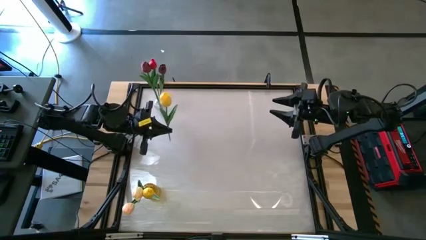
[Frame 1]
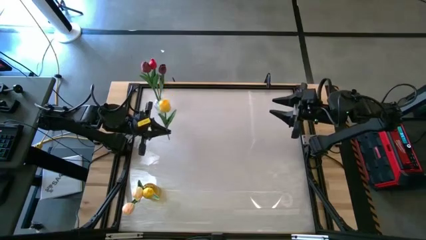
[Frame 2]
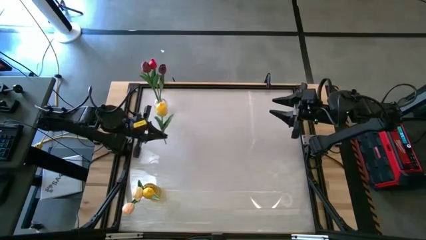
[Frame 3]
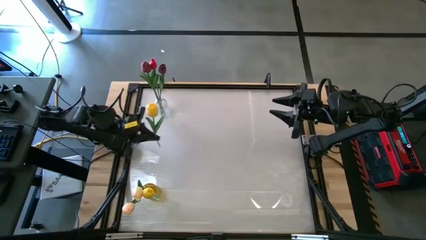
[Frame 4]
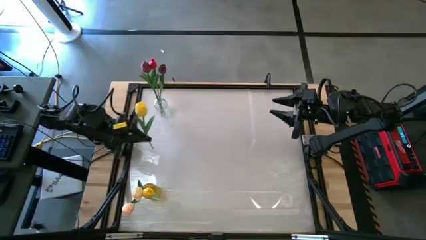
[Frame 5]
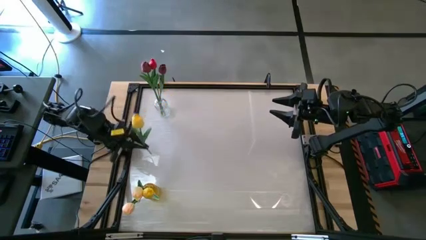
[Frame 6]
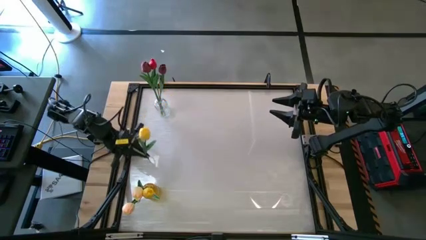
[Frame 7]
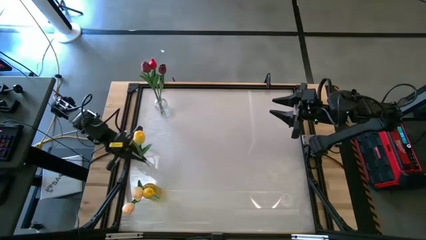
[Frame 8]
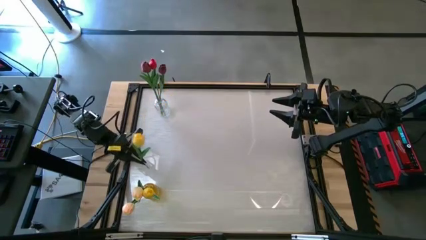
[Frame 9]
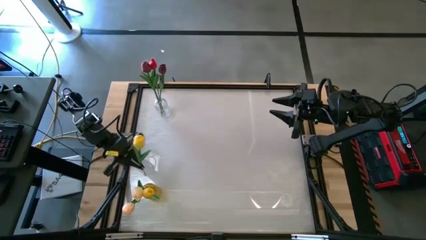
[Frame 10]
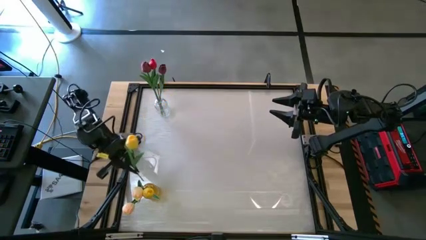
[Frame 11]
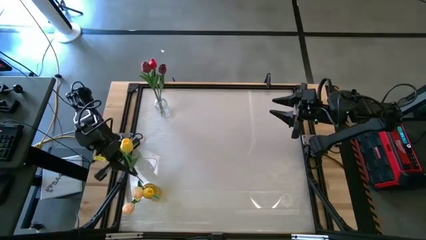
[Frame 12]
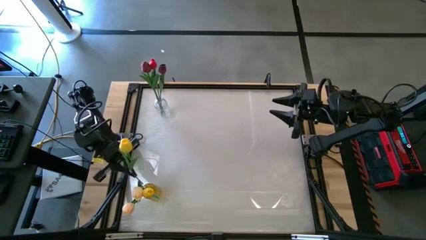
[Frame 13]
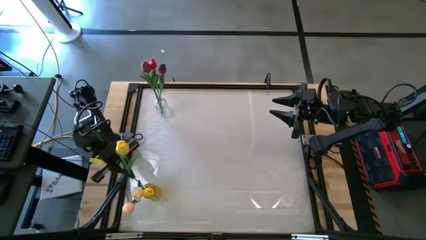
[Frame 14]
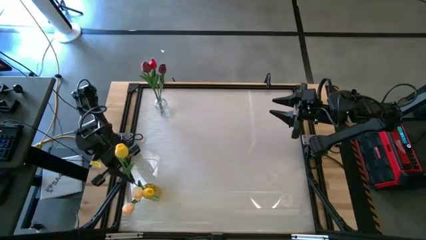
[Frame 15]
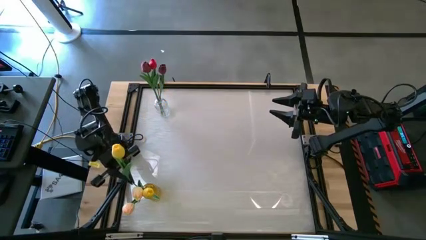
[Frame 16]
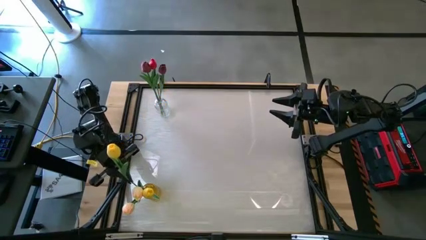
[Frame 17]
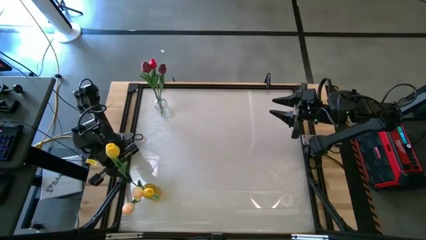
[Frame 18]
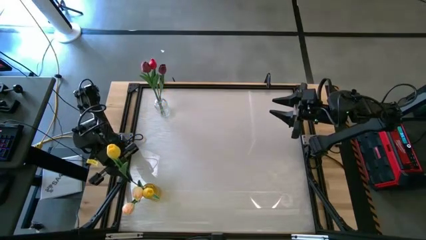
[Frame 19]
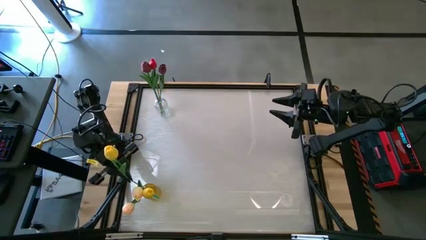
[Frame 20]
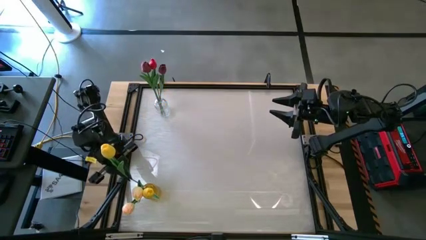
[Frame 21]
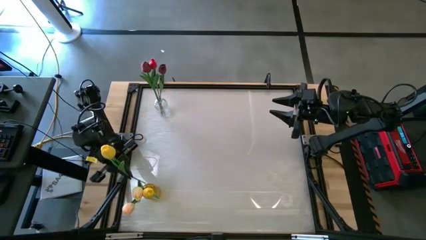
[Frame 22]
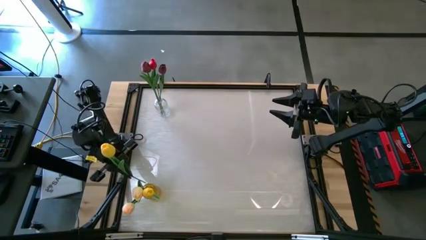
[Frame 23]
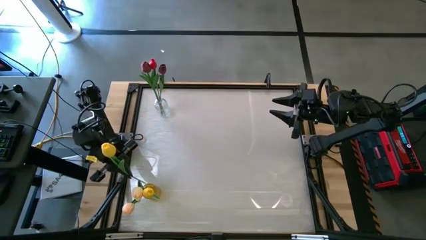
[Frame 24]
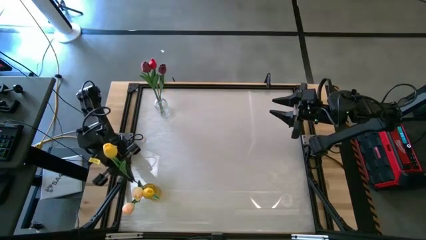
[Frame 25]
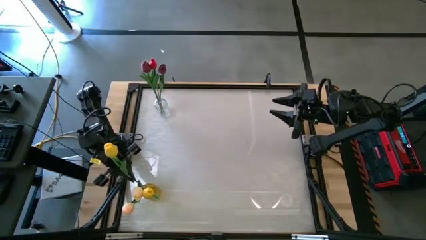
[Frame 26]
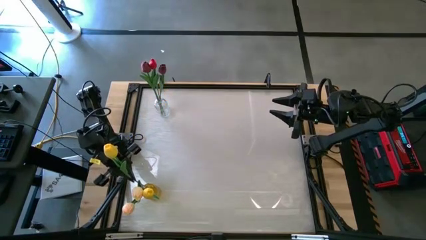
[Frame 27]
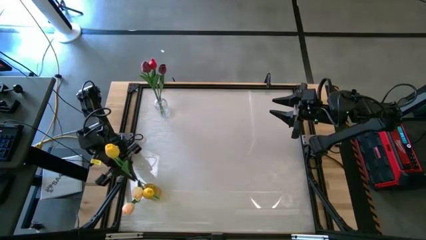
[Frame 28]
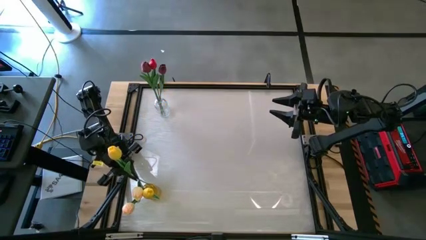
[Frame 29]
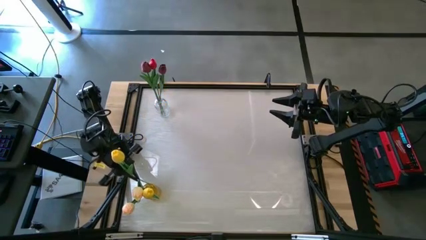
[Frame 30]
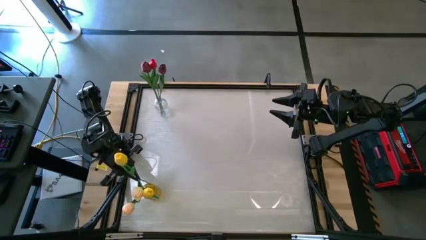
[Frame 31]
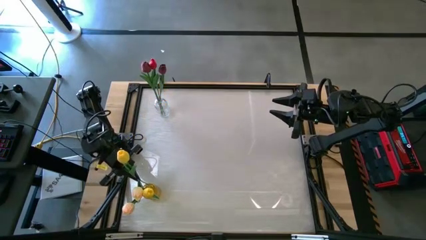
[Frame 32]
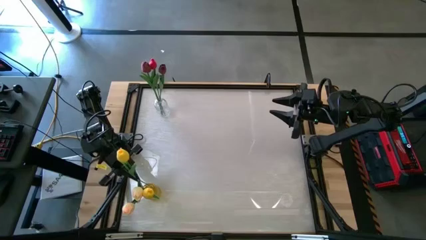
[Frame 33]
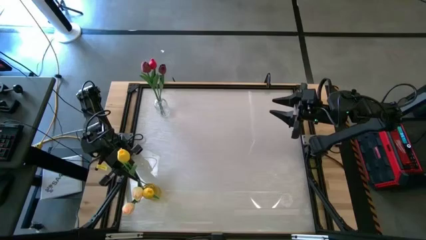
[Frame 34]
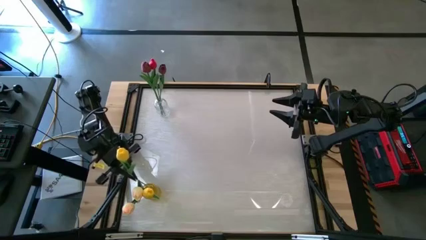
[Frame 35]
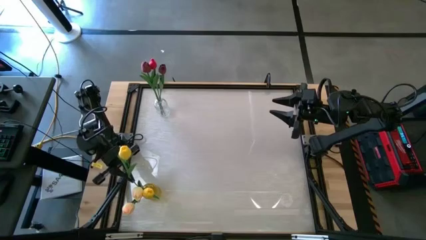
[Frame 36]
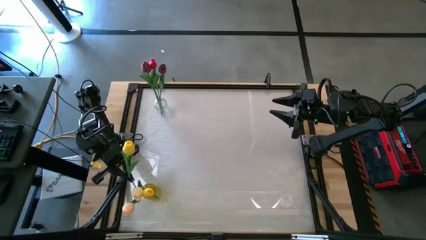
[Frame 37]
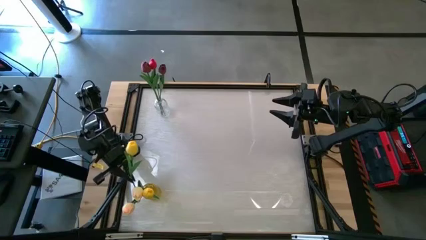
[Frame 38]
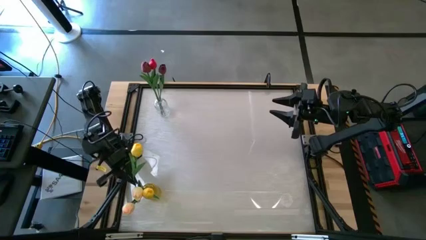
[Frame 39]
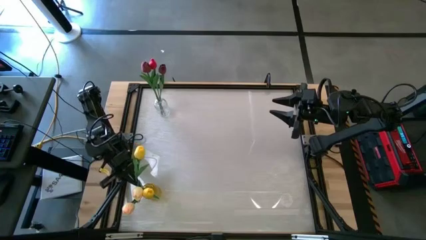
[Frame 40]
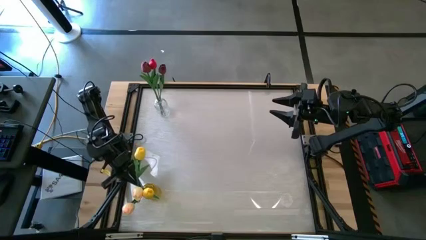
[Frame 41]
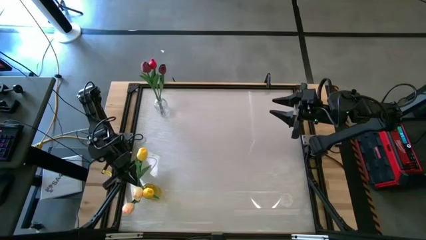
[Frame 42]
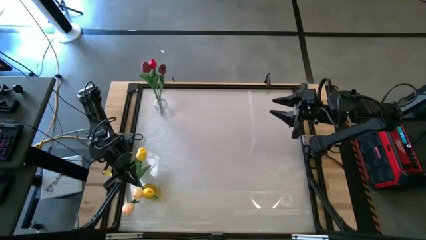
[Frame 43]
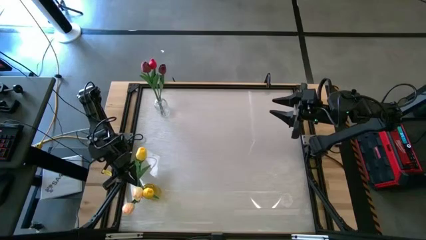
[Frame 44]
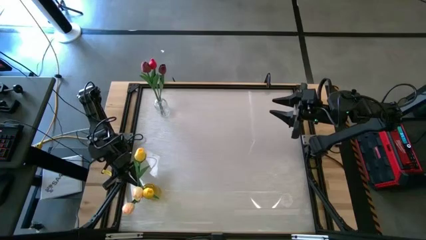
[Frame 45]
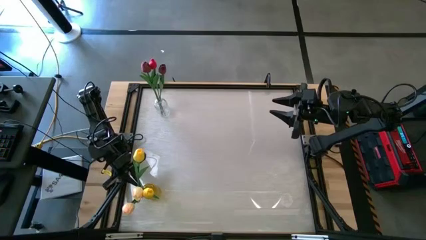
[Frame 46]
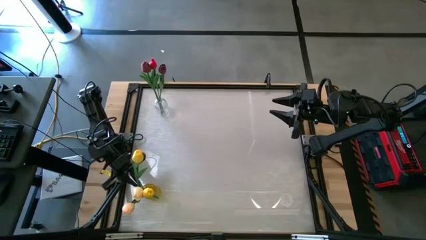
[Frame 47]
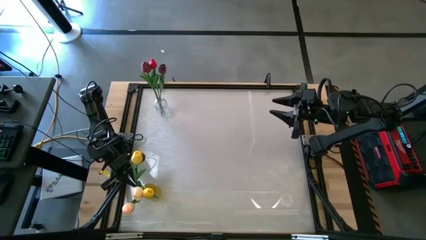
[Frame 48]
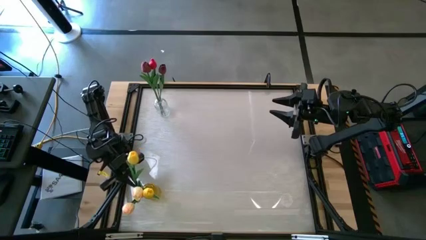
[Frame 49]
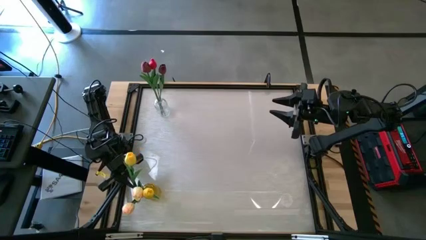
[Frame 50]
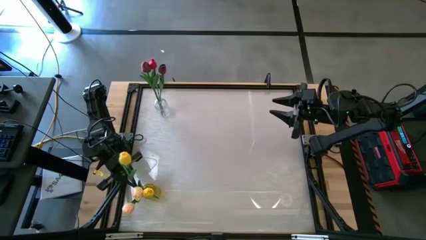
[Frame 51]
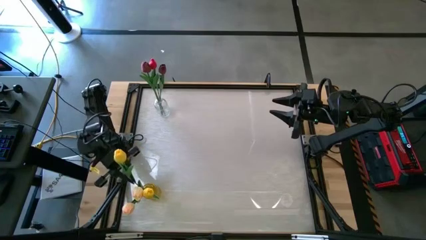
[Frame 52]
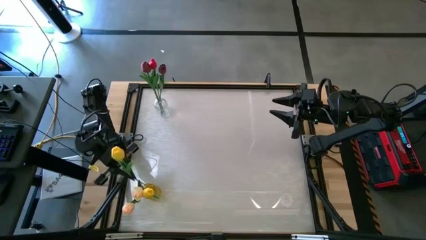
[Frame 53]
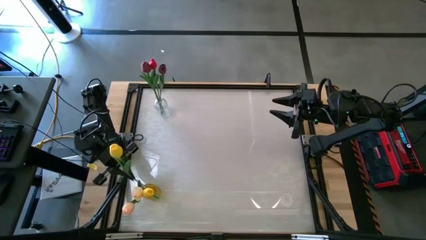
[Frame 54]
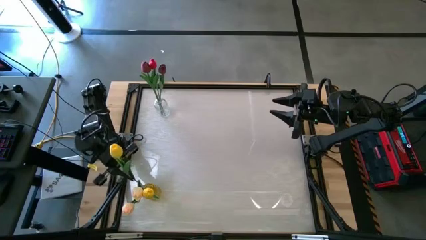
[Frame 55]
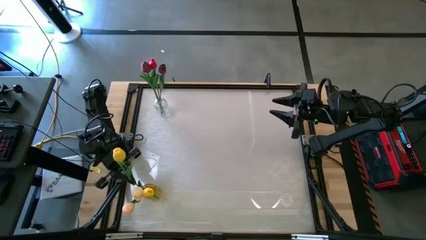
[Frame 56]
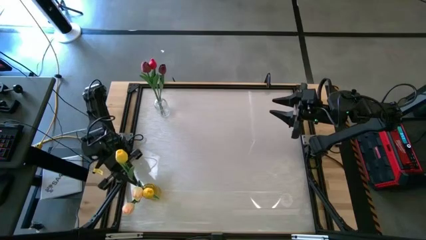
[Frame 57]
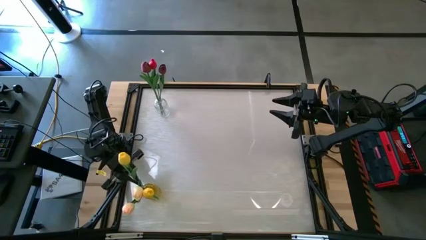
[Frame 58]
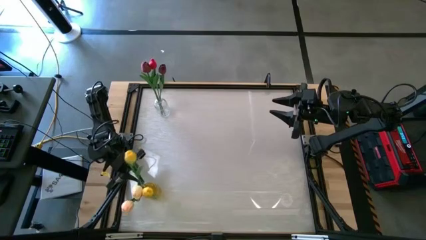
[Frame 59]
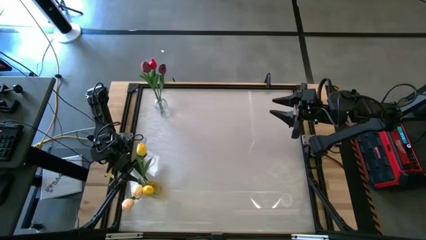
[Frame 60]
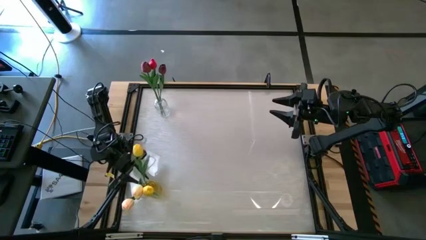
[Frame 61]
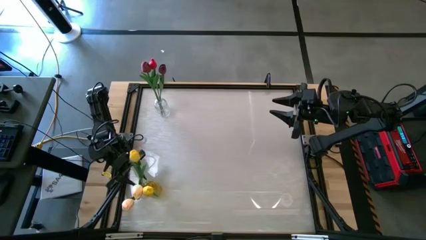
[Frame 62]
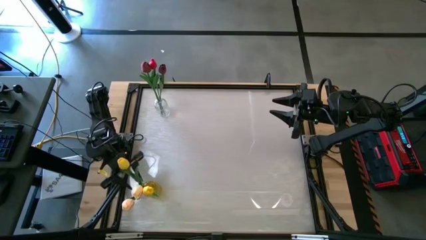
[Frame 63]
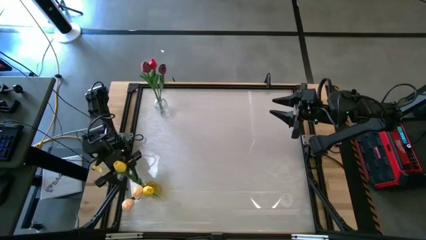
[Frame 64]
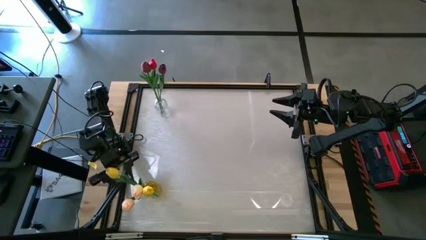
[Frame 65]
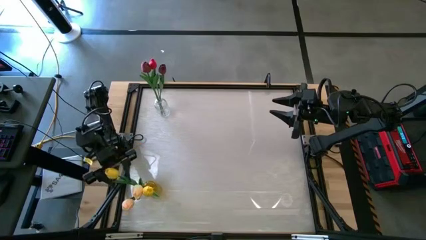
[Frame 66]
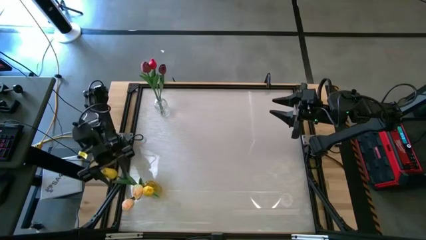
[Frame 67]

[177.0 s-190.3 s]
Task: Sort flowers into vase by color
Put the yellow flower into the yellow vase

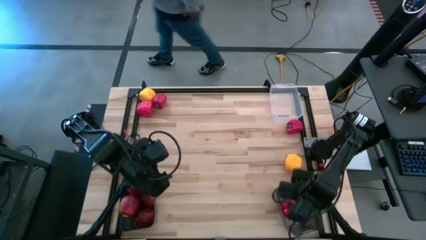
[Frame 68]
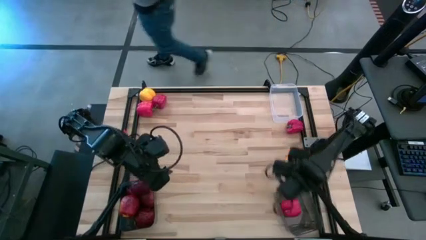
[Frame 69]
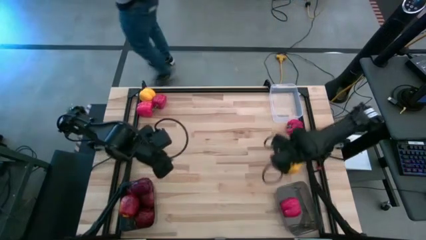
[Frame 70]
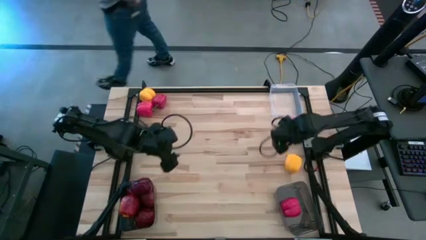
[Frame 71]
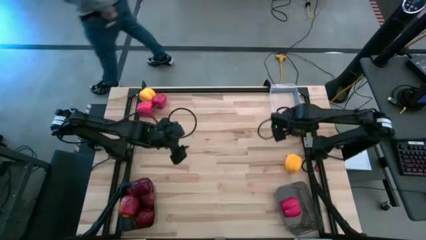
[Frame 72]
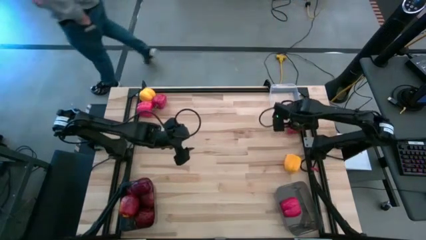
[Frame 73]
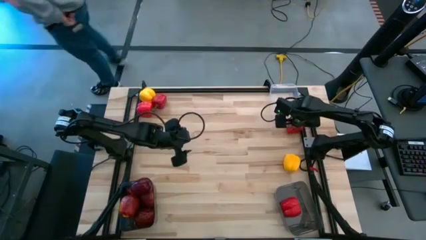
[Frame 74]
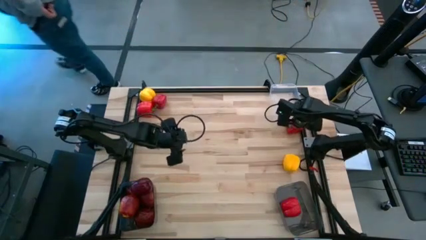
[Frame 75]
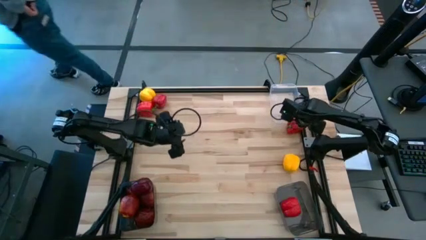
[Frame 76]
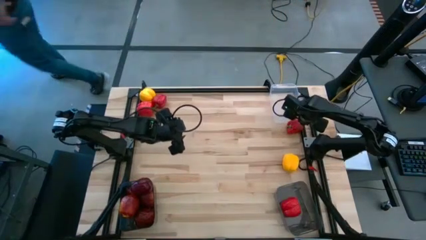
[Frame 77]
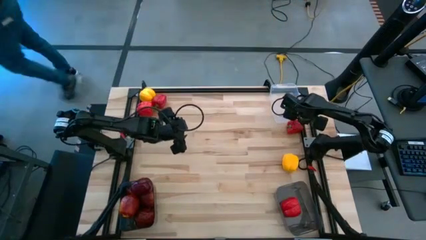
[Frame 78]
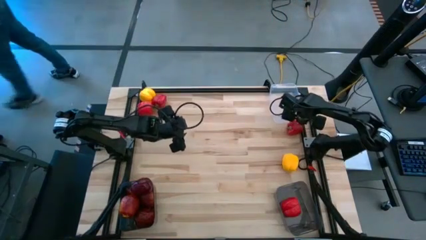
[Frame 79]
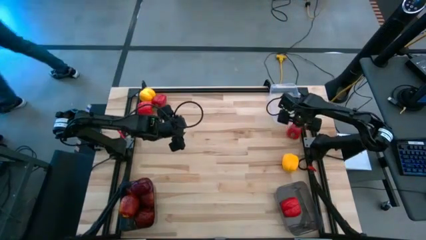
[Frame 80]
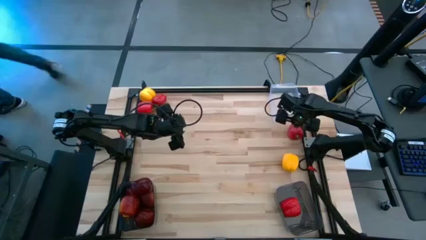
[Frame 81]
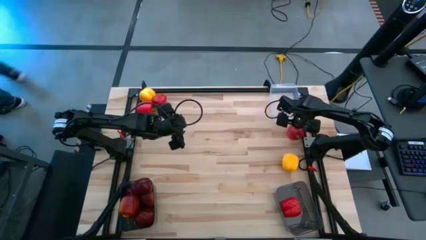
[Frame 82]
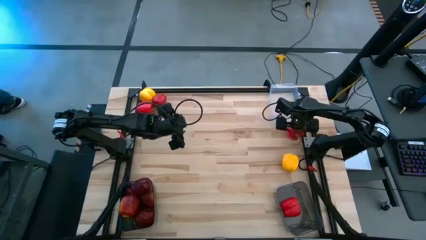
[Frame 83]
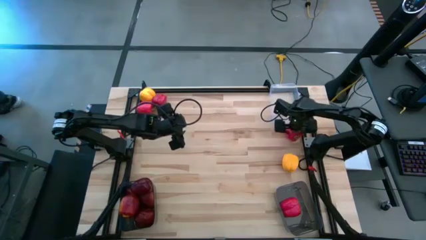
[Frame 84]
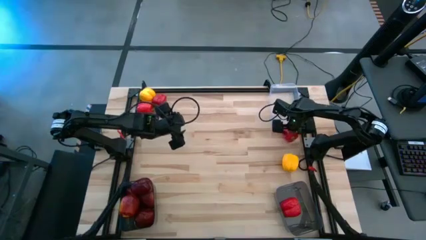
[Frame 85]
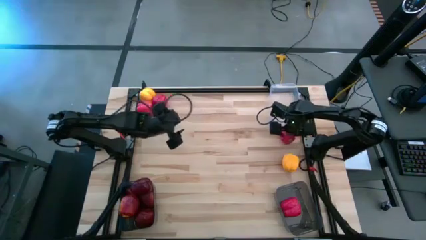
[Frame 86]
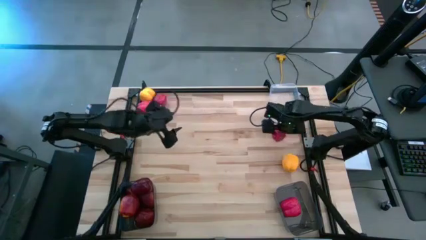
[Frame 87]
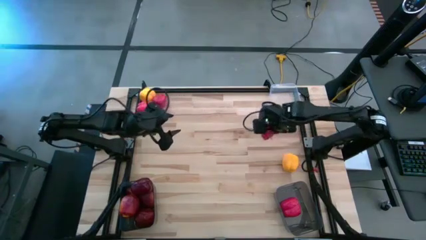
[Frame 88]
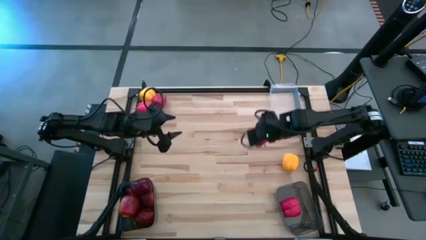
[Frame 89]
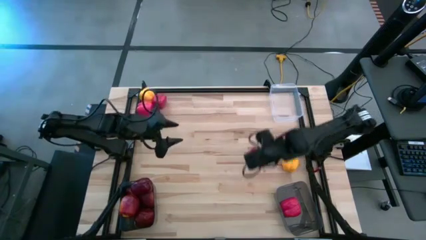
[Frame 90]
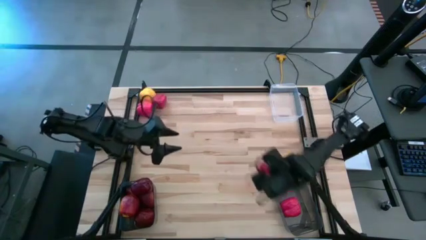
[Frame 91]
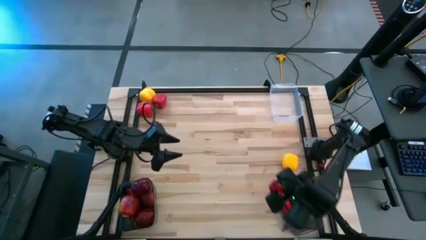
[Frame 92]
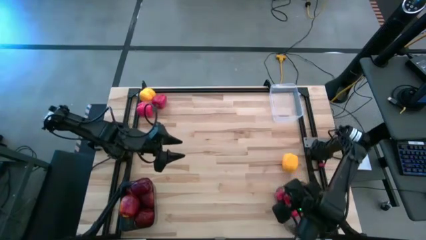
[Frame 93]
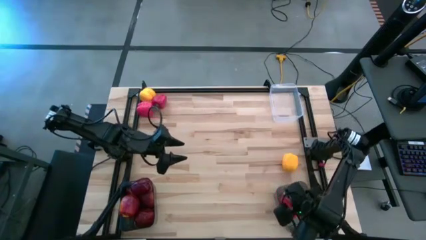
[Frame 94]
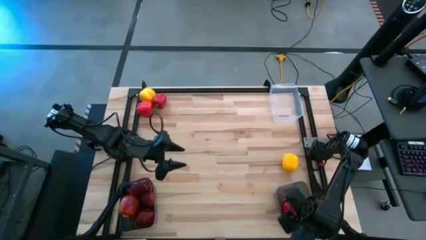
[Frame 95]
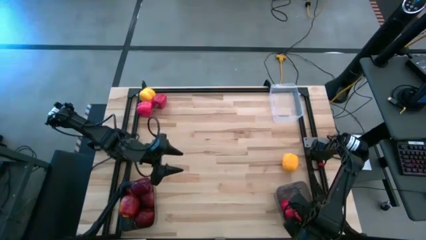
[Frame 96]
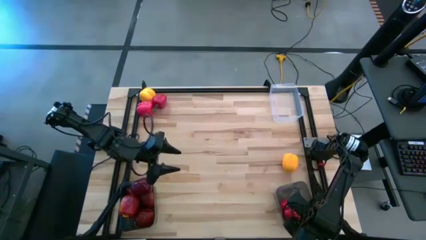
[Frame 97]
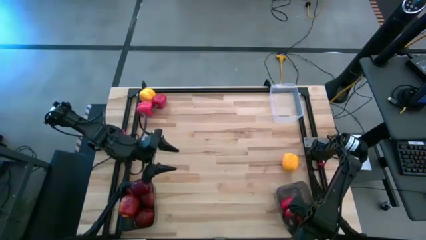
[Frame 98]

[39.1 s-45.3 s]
Task: Sort produce into baskets
Put the red bell pepper into the right black bin
